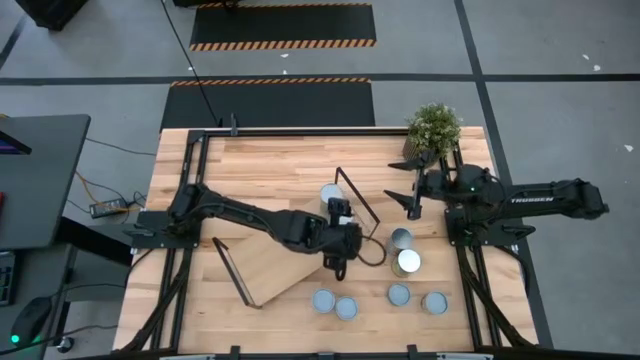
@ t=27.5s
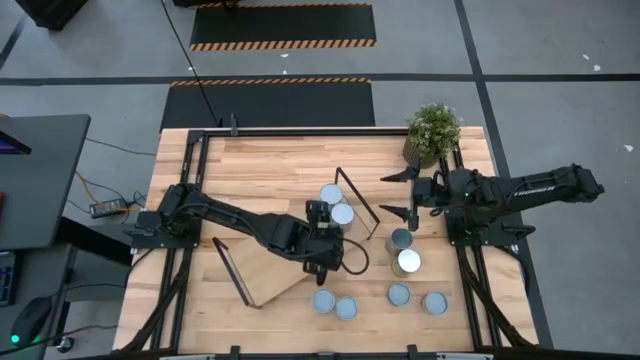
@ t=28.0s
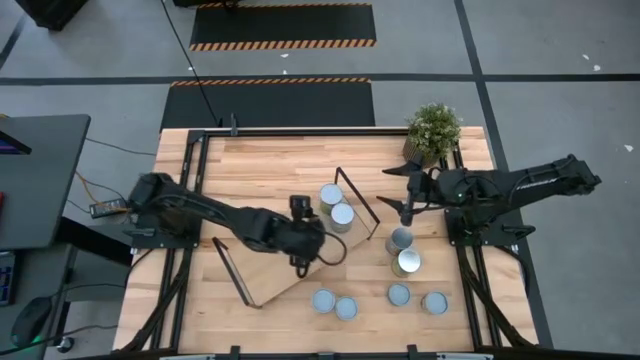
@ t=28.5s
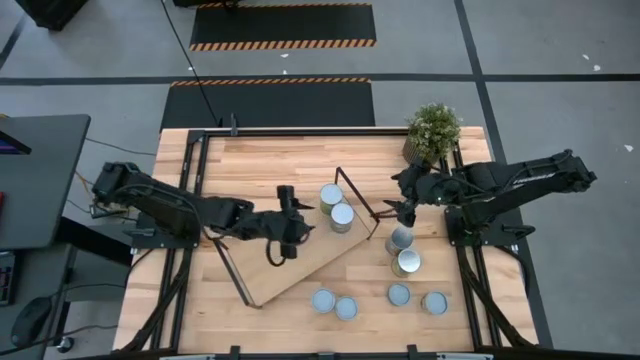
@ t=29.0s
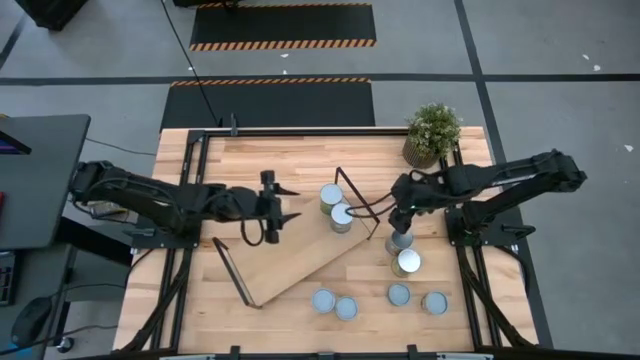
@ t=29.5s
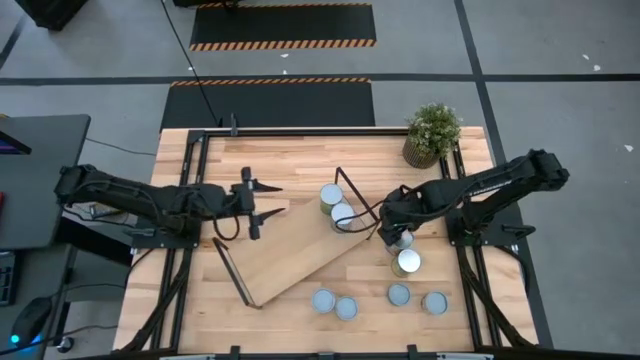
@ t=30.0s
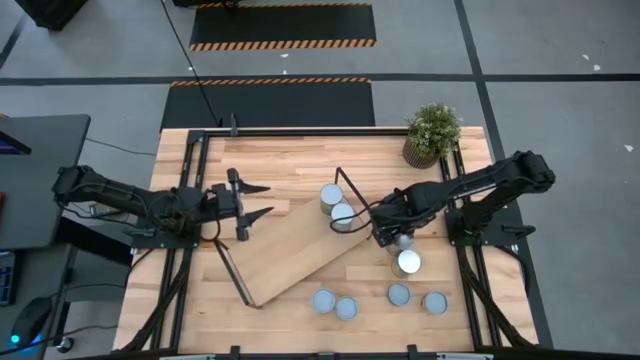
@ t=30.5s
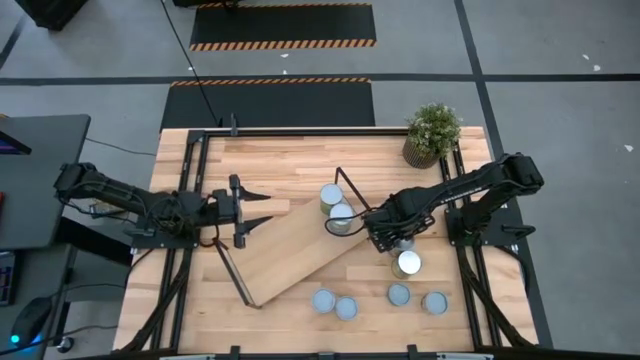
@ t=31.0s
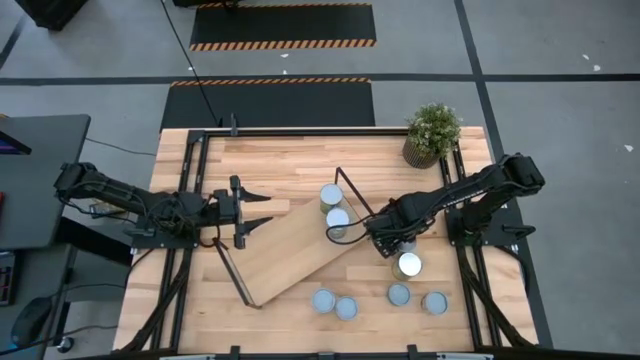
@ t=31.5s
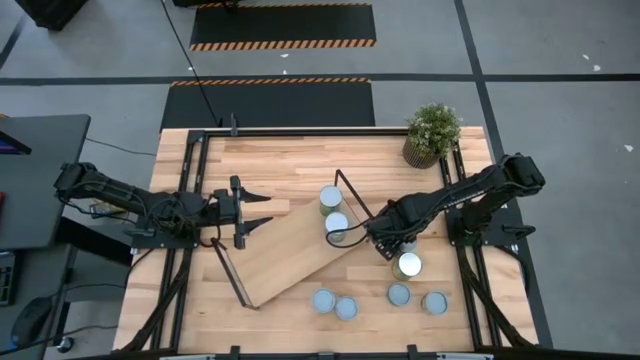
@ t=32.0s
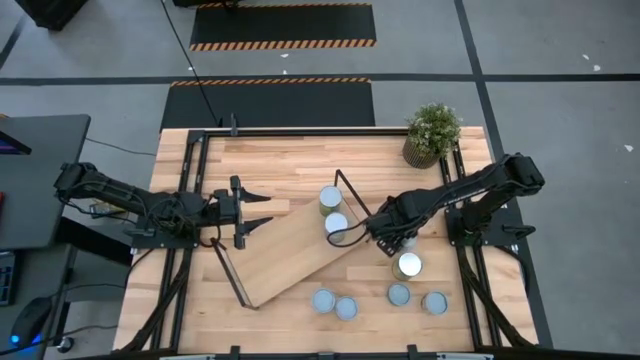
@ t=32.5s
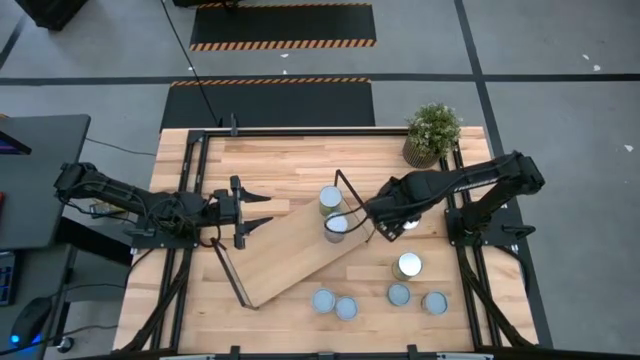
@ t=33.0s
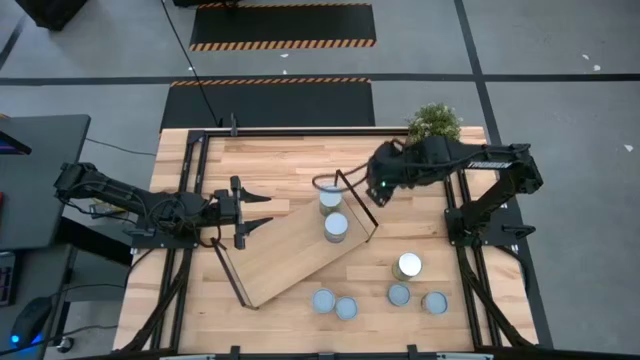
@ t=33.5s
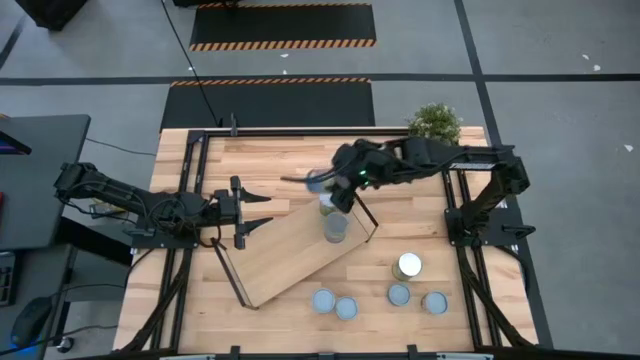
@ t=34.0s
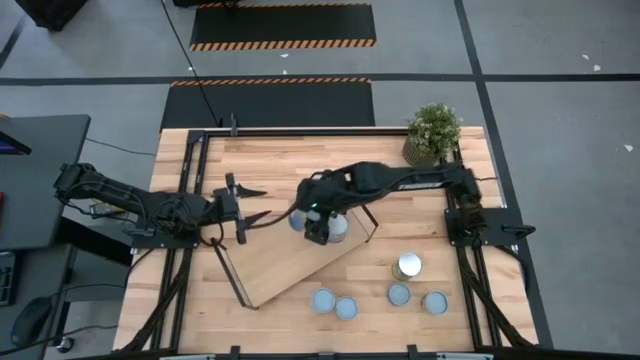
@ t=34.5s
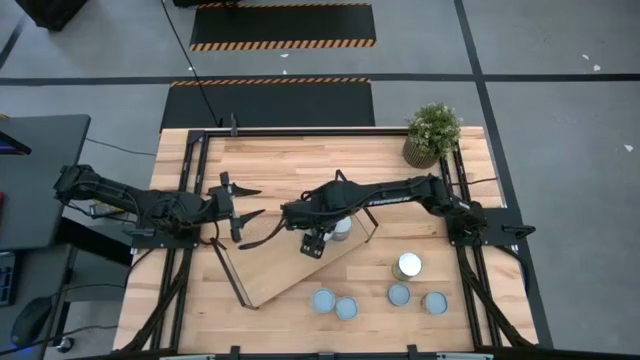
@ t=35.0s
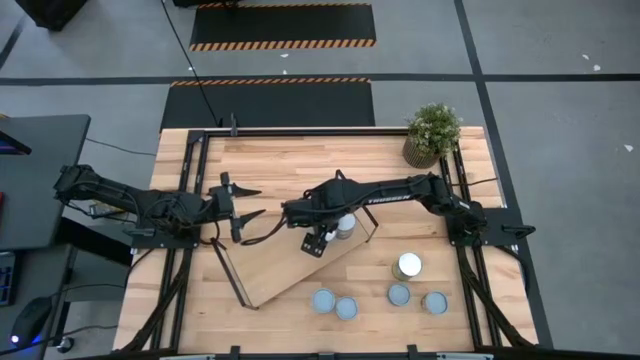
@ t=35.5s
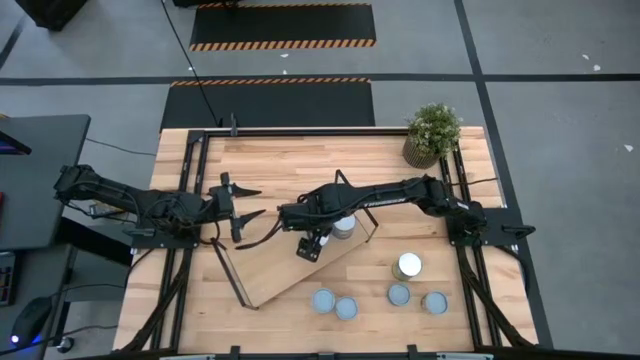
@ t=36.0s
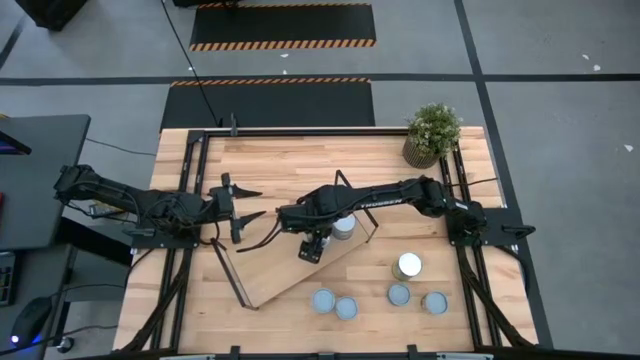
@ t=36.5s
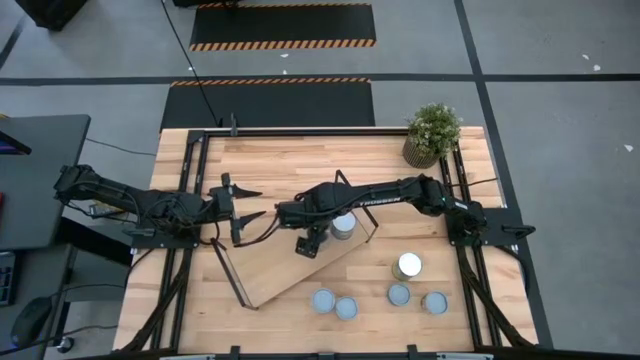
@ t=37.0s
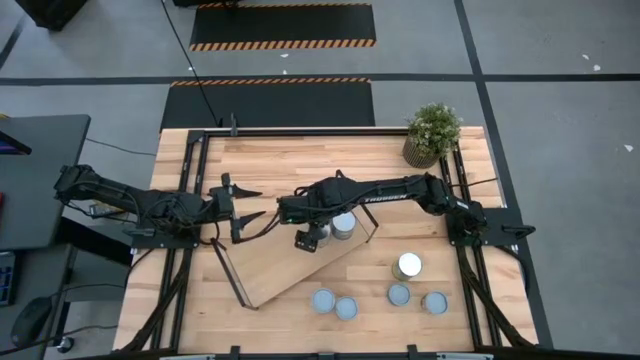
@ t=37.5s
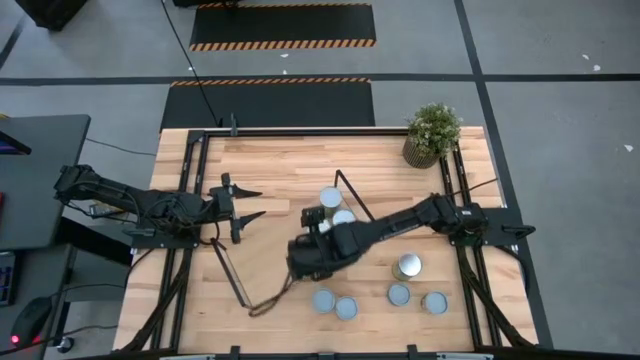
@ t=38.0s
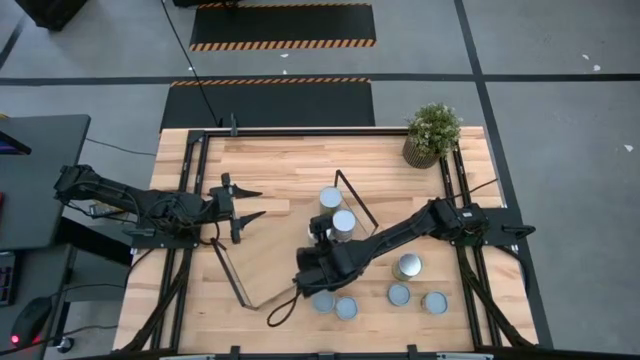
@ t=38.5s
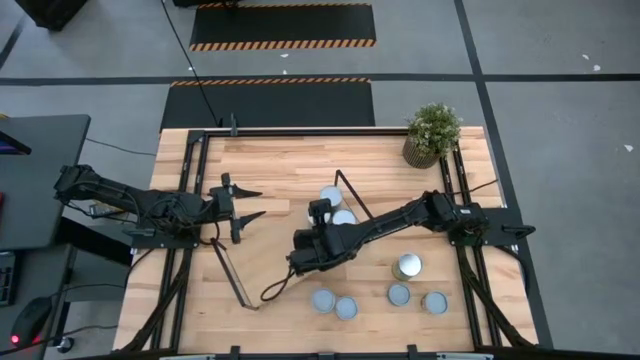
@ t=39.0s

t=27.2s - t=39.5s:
Task: Pick and place cans onto a shelf
Put the top big can on the shelf

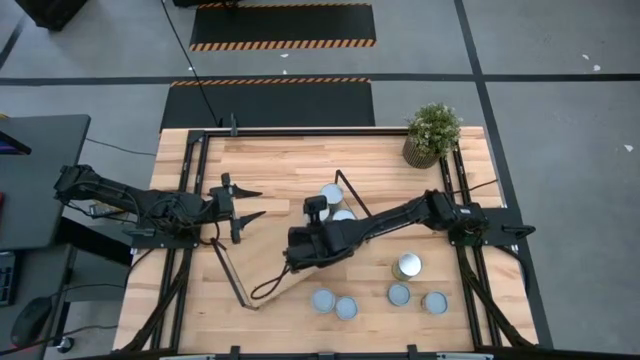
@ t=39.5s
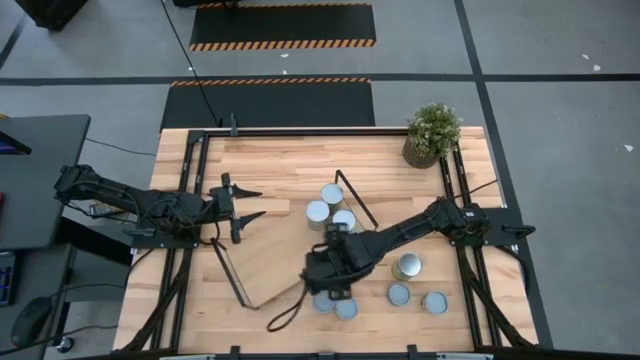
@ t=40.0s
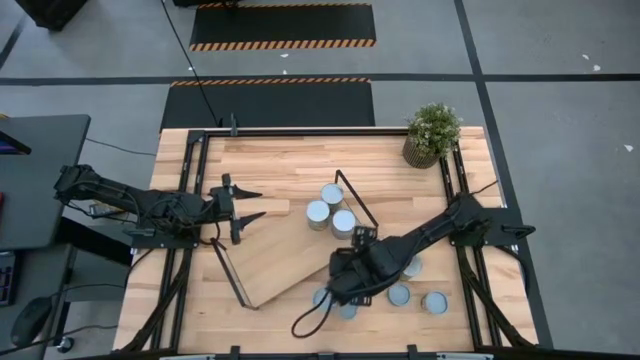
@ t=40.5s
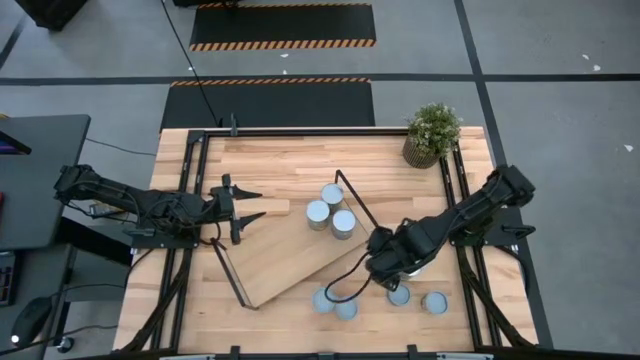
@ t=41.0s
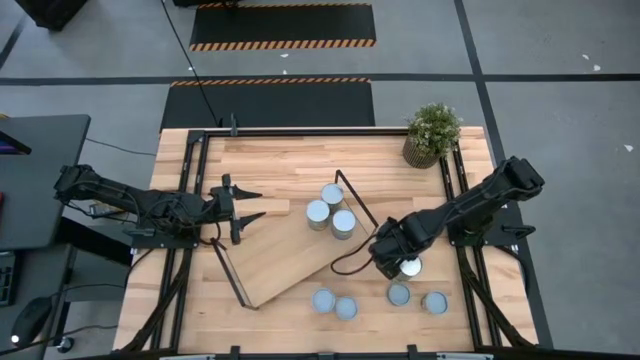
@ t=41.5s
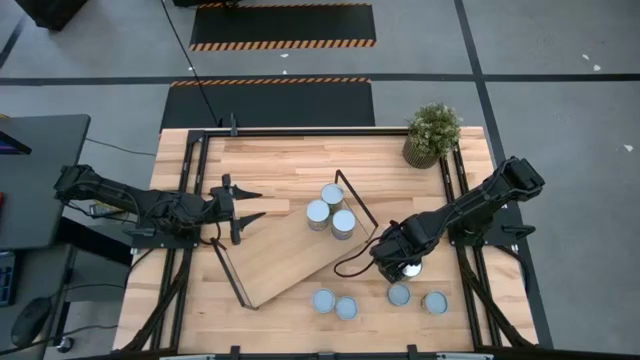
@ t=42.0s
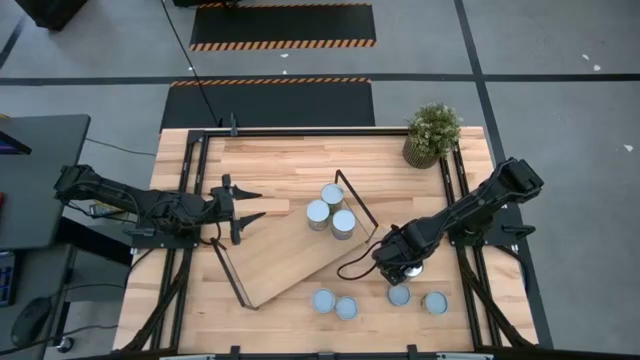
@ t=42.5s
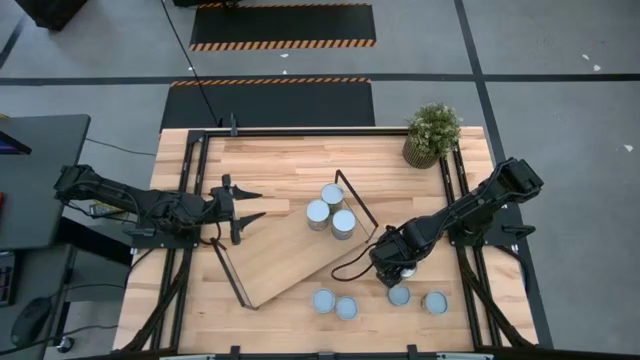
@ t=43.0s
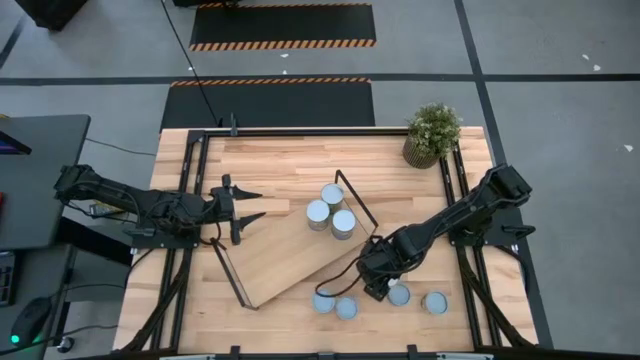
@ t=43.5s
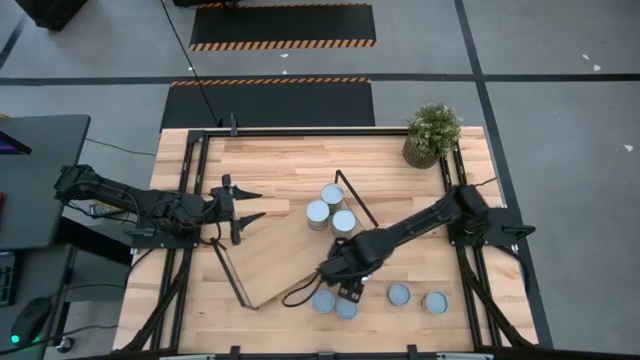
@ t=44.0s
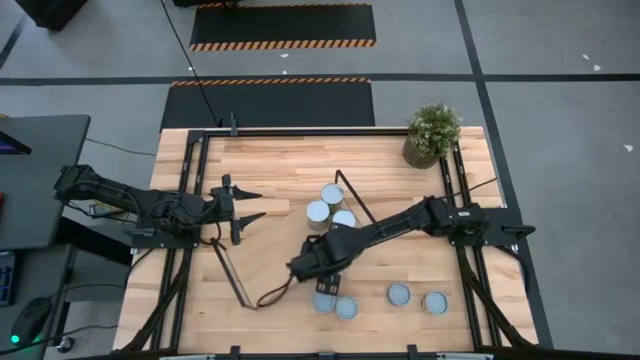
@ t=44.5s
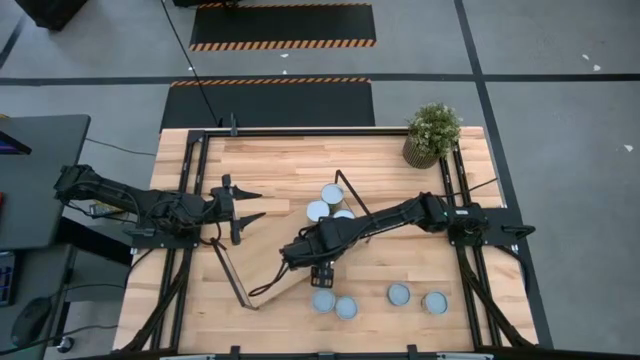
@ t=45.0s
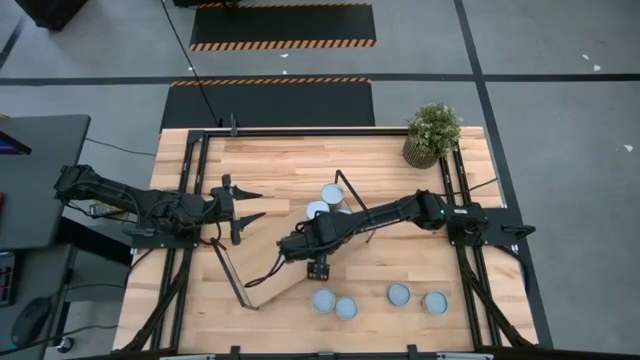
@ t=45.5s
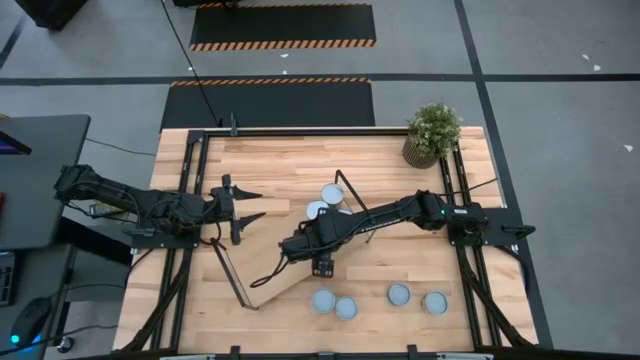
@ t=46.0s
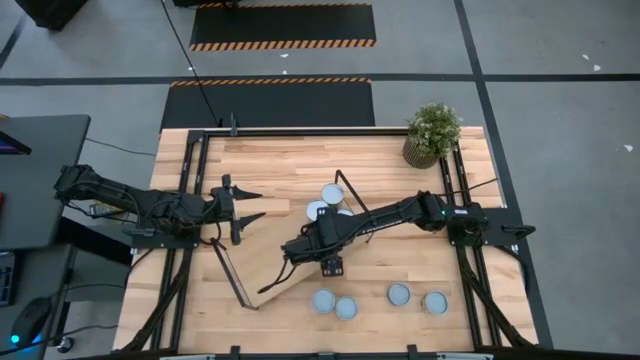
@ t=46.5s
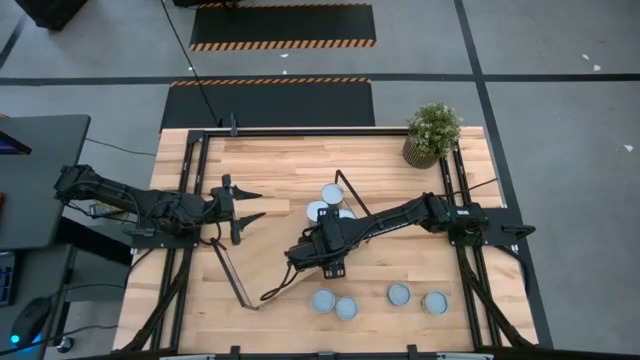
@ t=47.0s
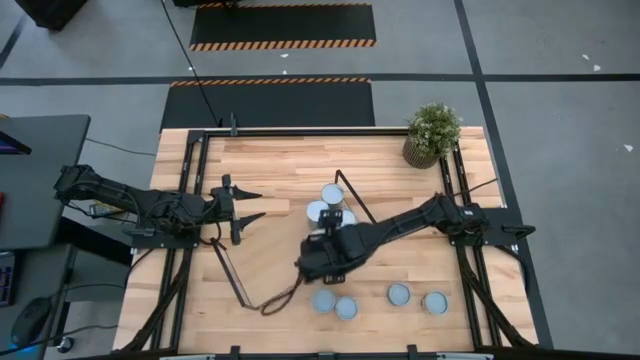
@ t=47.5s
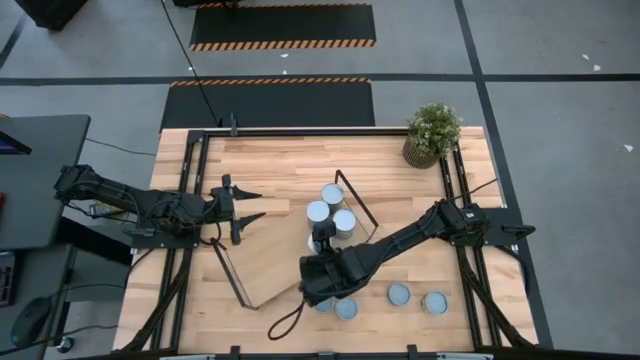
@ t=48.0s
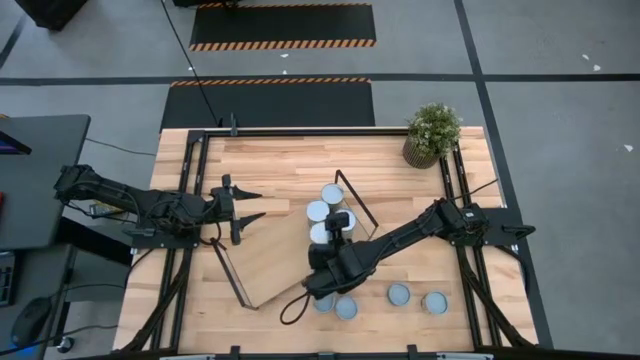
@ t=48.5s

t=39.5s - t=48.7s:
Put the big can on the shelf
